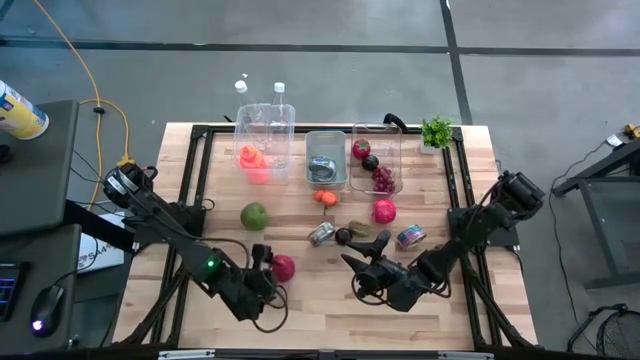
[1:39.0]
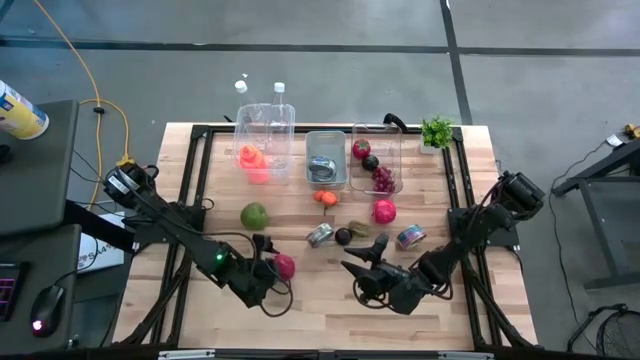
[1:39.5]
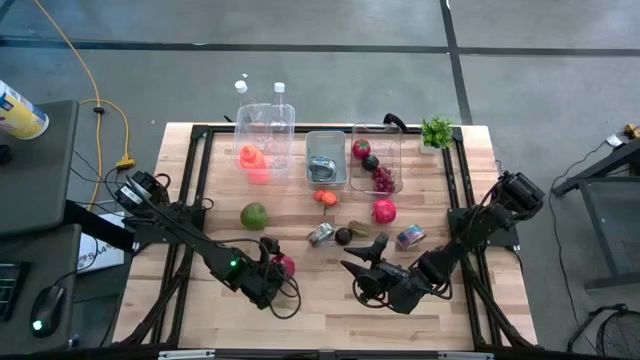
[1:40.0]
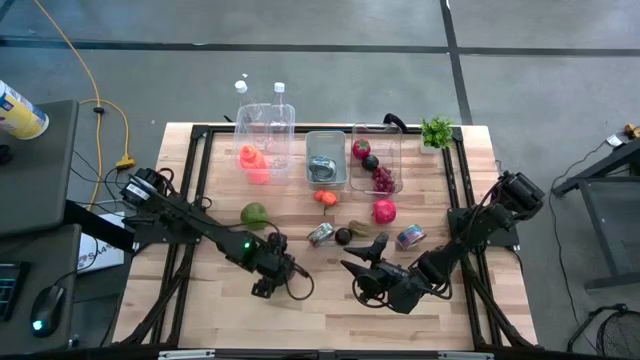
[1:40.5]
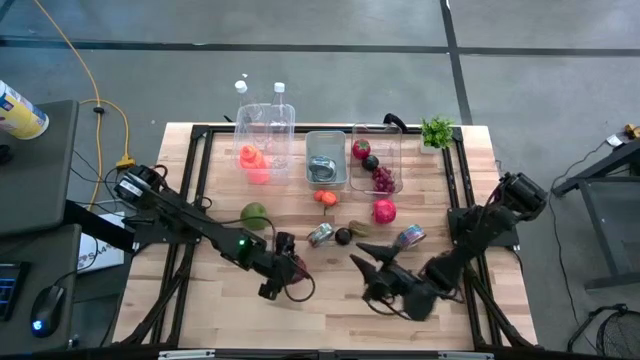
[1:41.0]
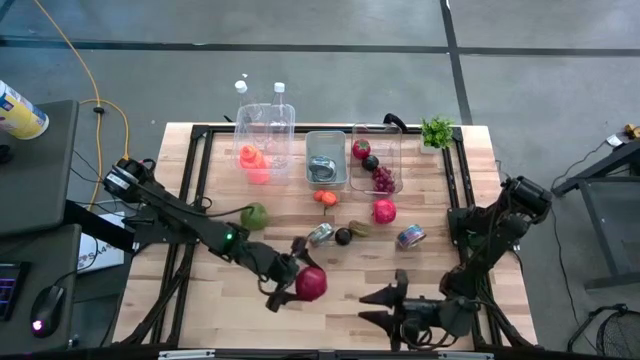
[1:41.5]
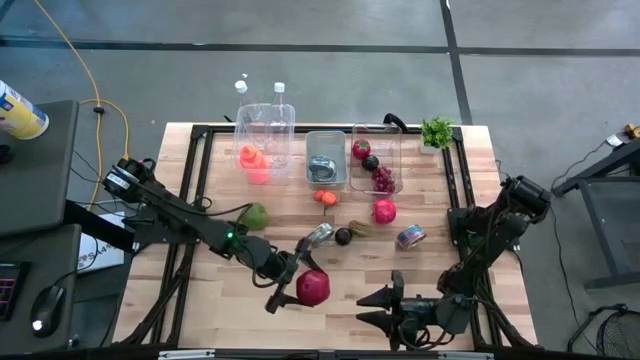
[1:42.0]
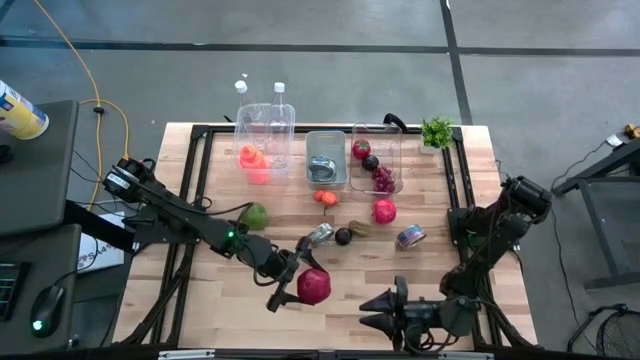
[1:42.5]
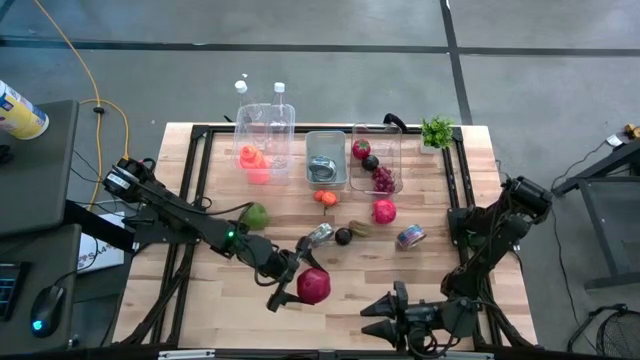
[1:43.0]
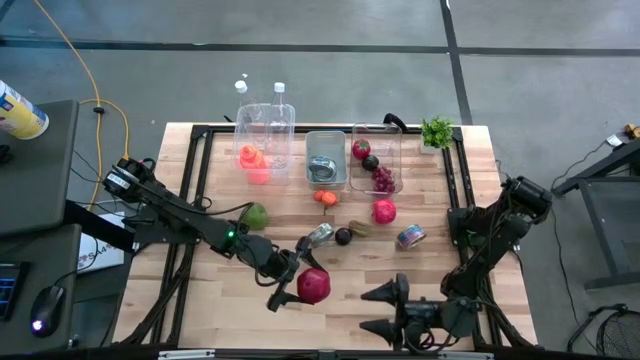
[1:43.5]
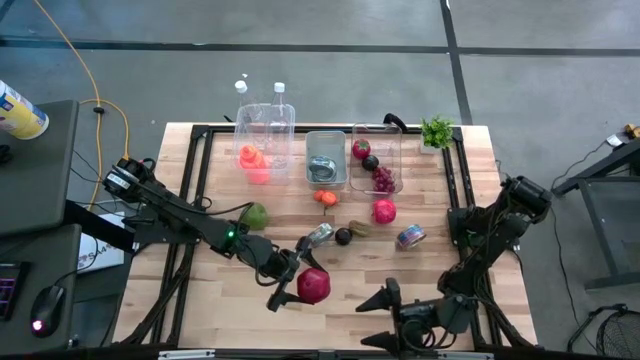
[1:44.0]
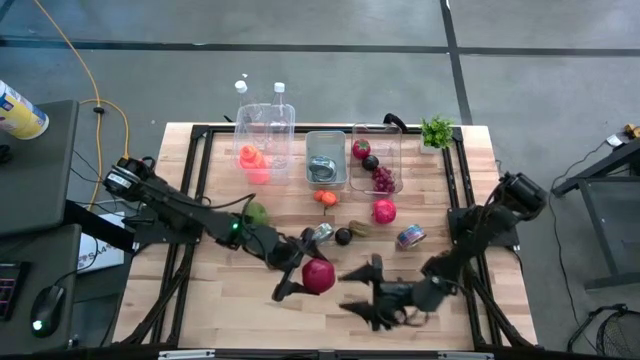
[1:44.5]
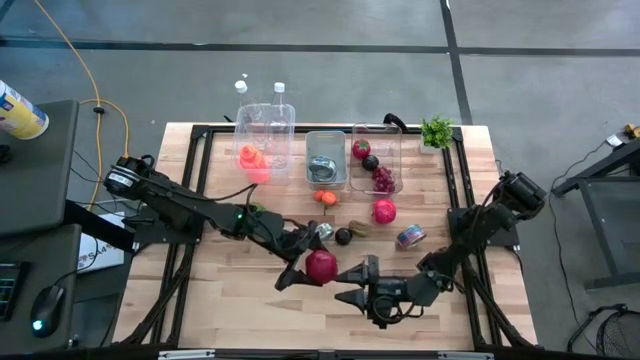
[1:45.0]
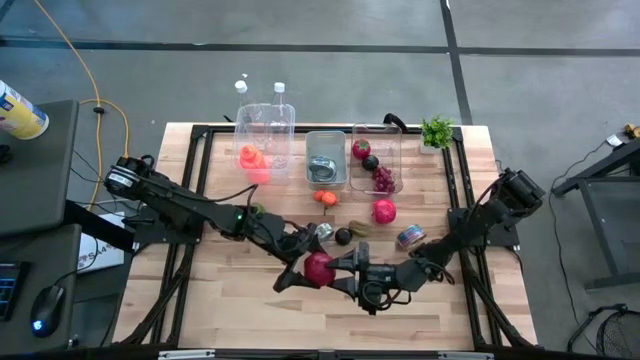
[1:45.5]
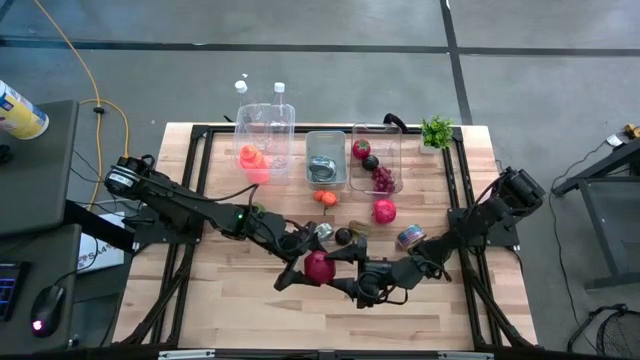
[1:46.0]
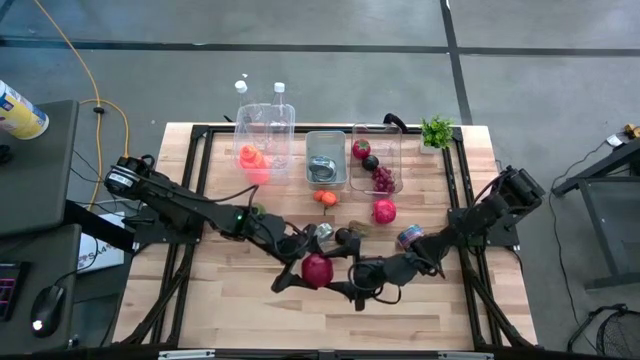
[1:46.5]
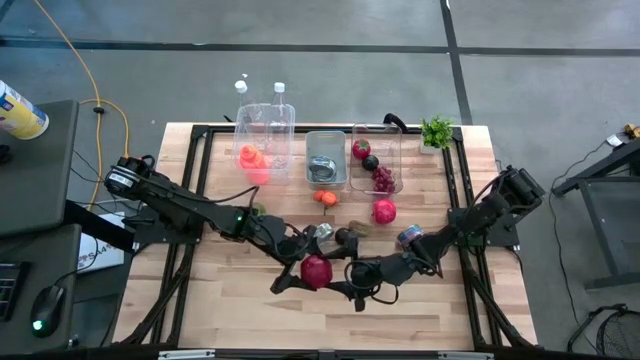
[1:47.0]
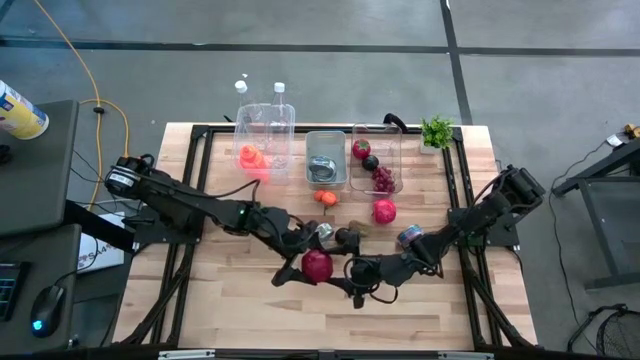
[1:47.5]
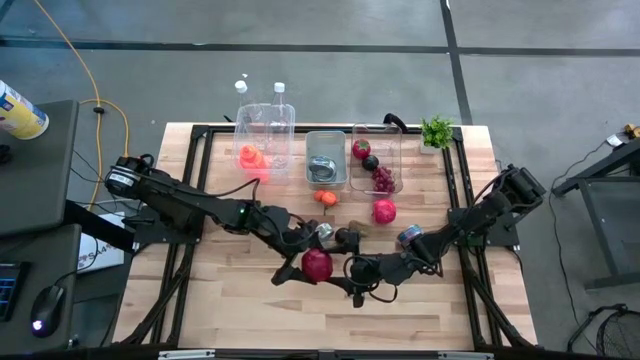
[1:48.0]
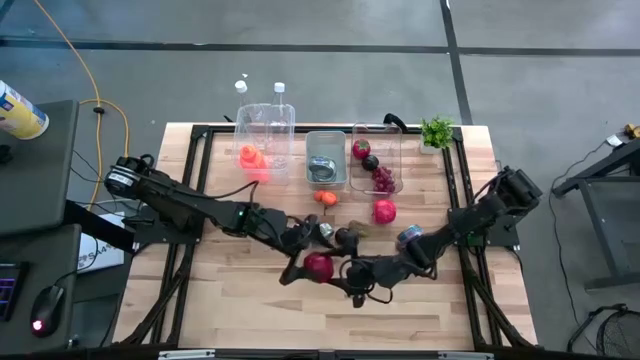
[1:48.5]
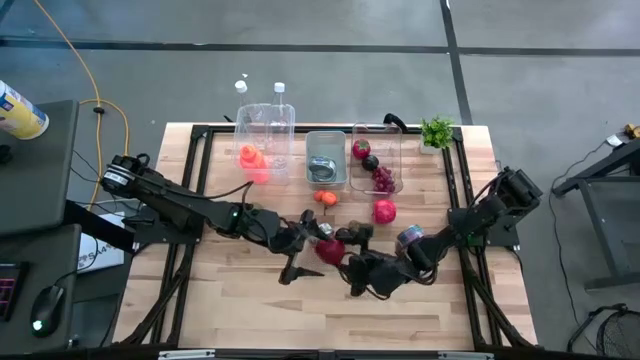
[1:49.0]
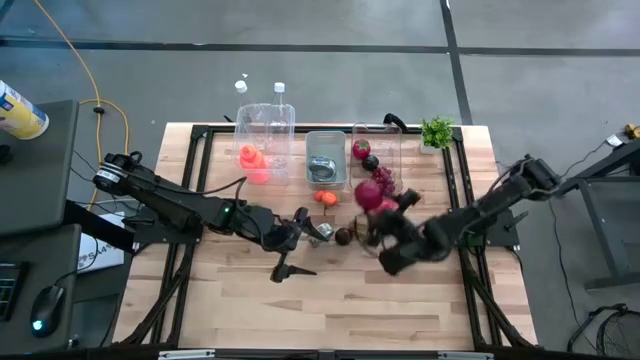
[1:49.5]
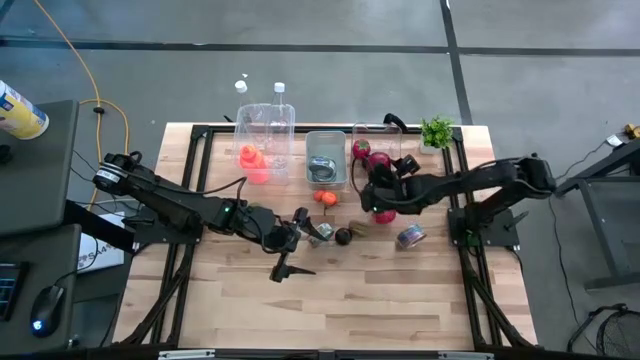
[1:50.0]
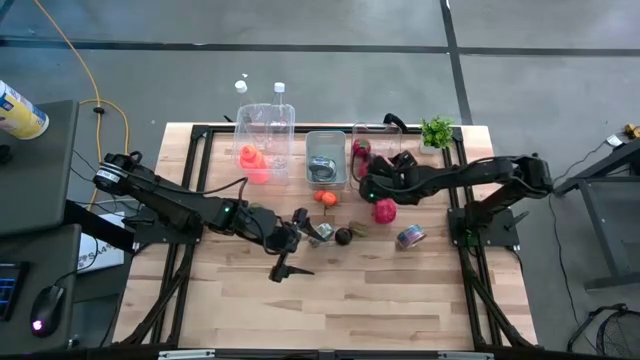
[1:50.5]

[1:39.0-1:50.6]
Task: Pick & Place Food Item
Put the pomegranate into the transparent bin

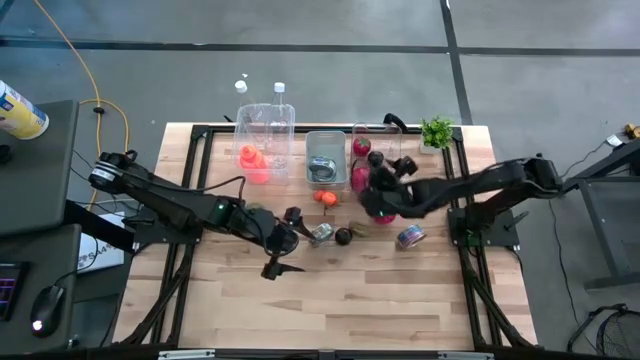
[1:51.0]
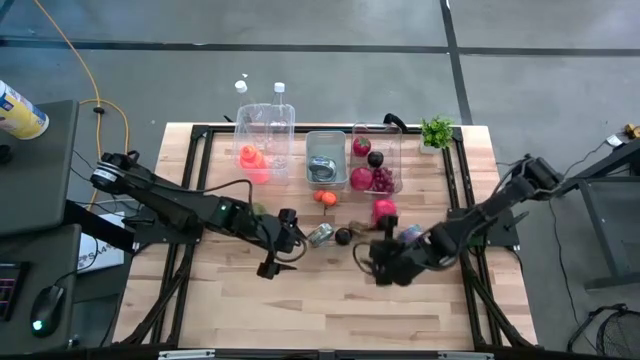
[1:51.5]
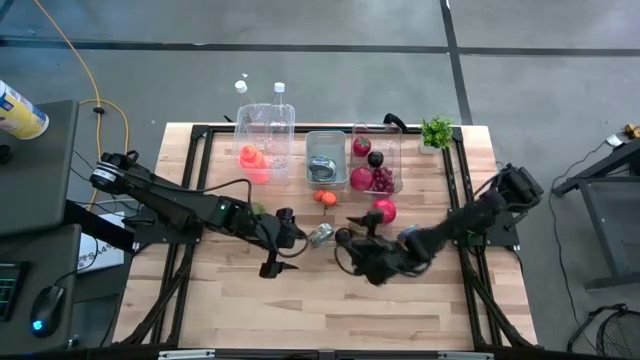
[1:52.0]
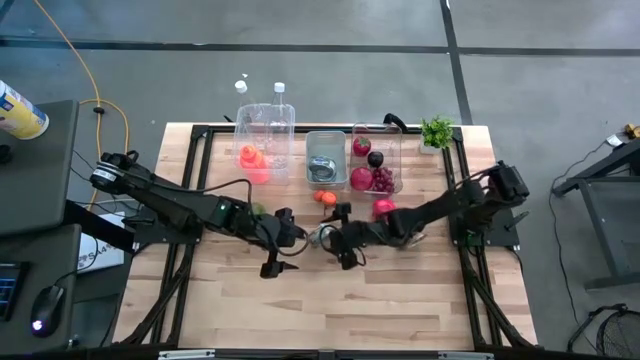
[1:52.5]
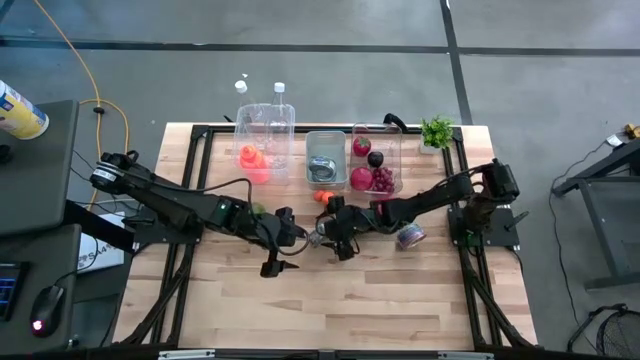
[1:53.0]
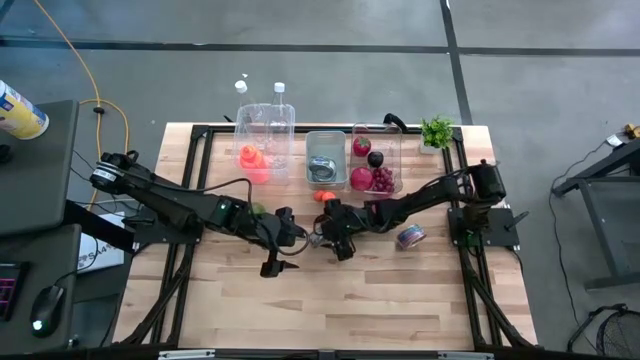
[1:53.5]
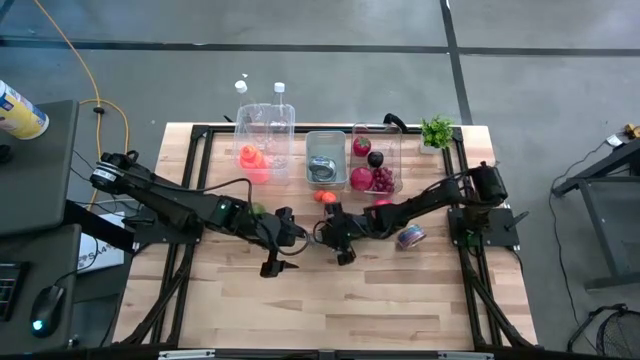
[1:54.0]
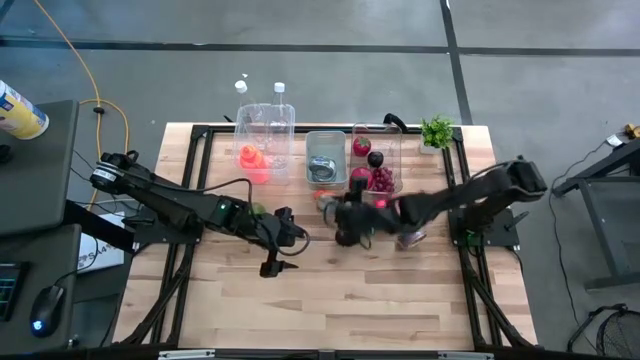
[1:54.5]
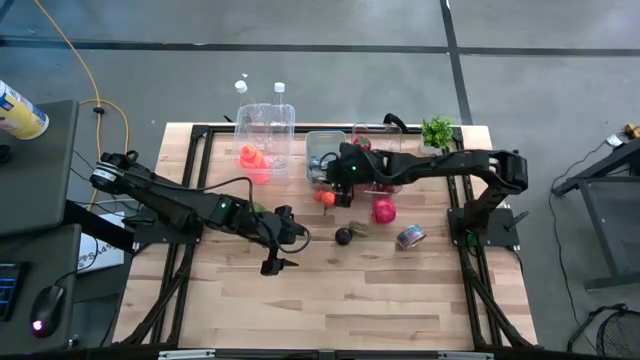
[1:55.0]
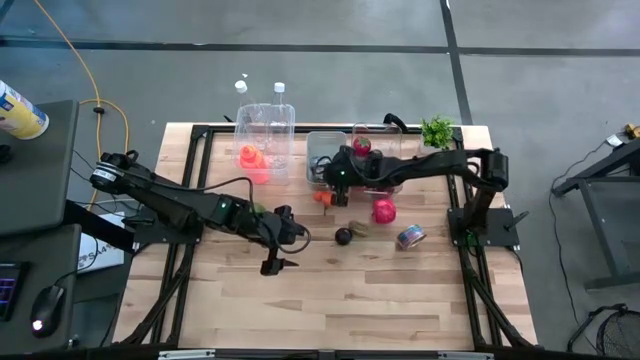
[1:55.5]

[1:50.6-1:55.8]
Put the green tuna can into the grey bin

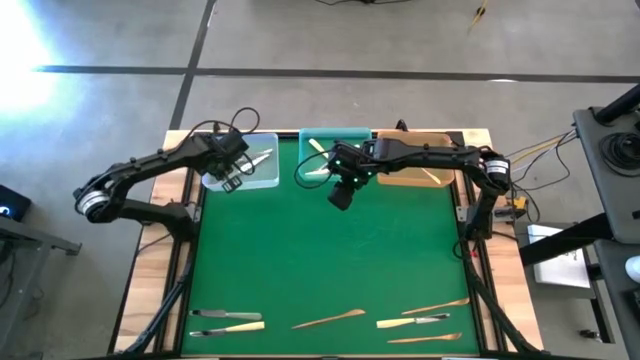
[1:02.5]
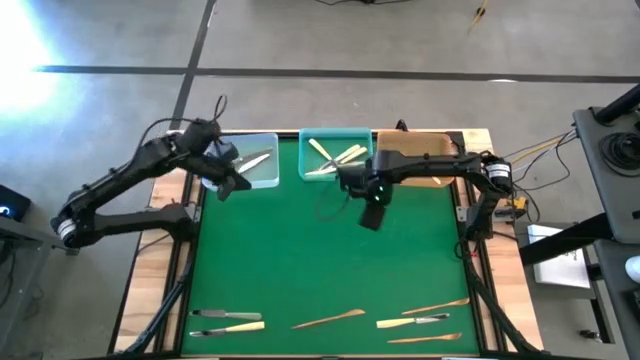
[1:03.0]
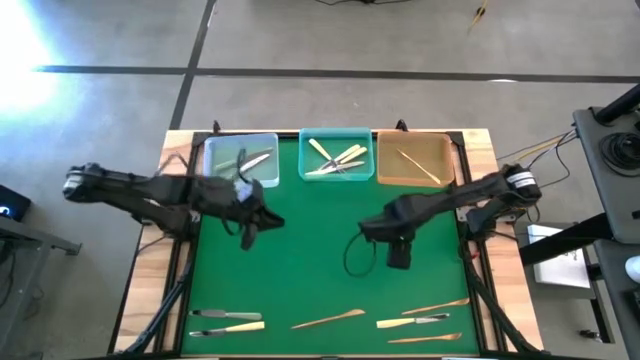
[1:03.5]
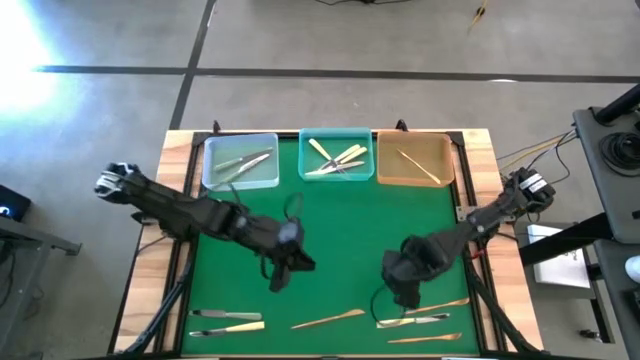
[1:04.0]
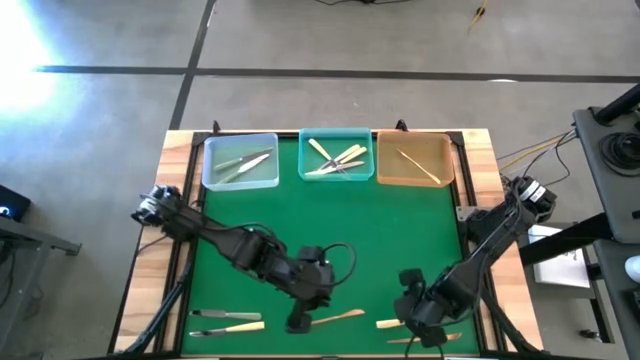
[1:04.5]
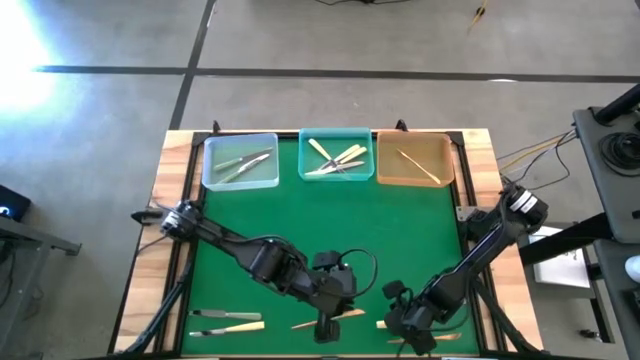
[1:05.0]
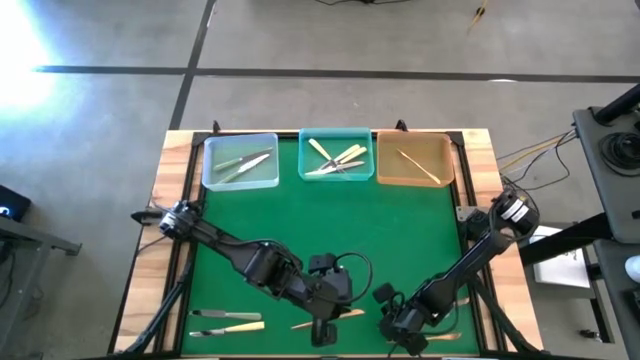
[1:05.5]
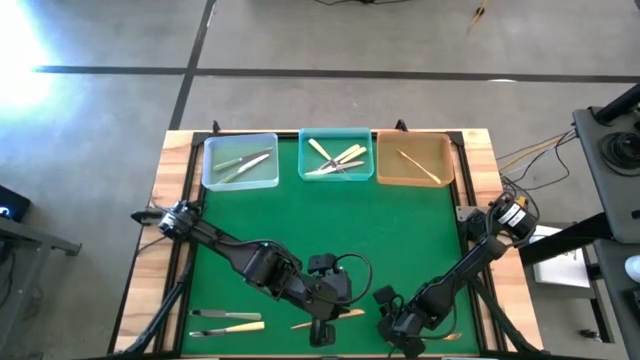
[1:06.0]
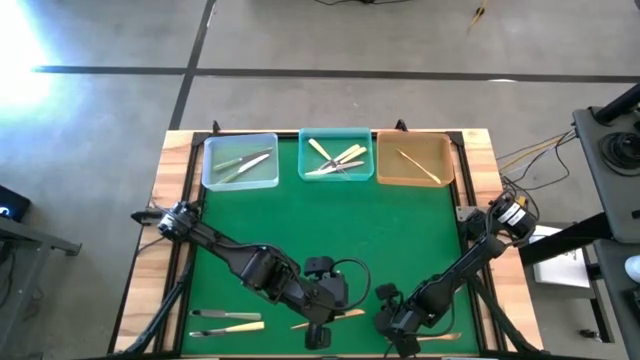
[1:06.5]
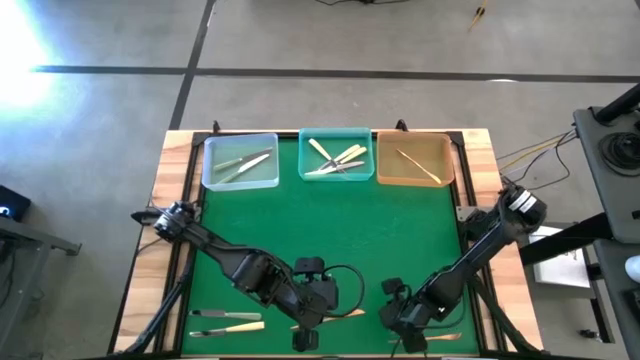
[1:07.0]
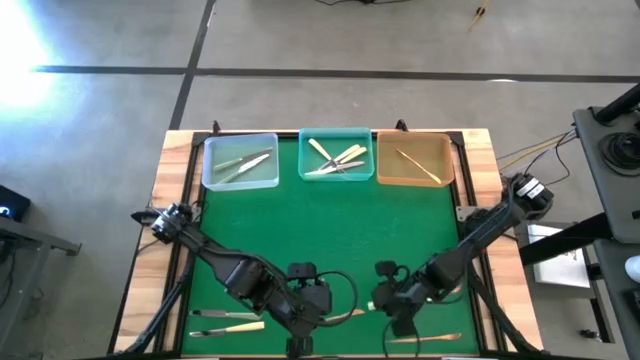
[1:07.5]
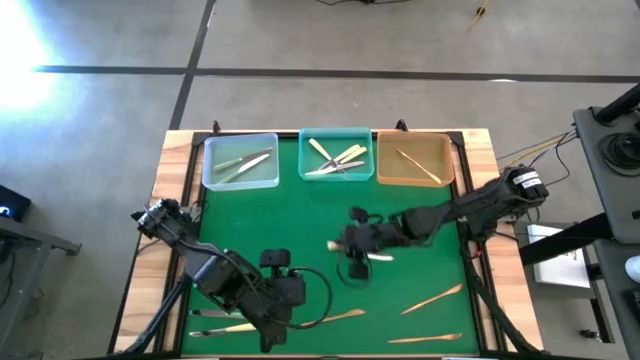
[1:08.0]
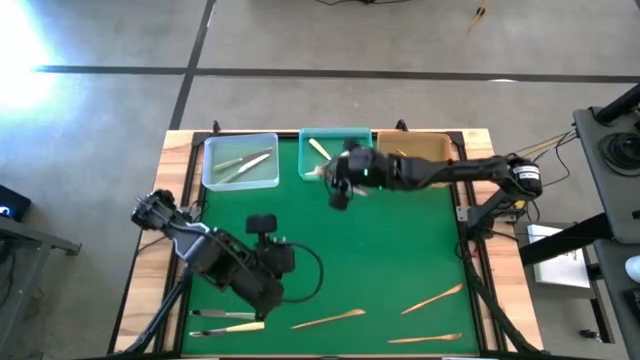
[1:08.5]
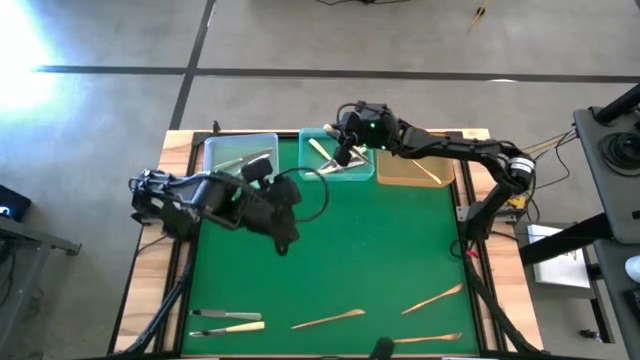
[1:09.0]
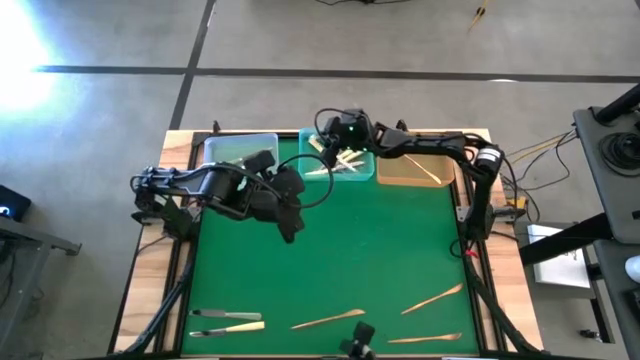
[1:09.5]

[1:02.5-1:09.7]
Task: Sort silverware by color (type)
Put the right gold and silver knife into the blue bin
